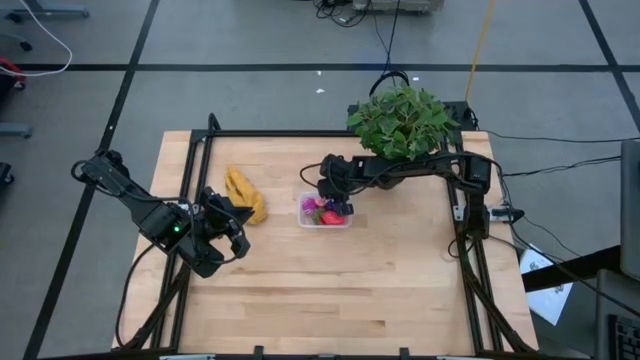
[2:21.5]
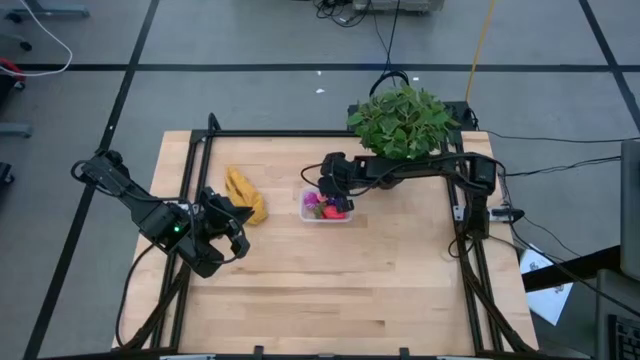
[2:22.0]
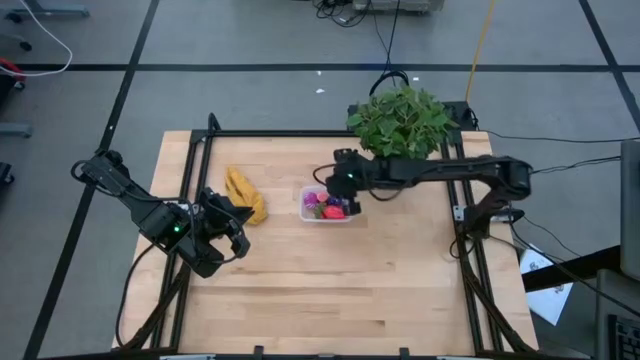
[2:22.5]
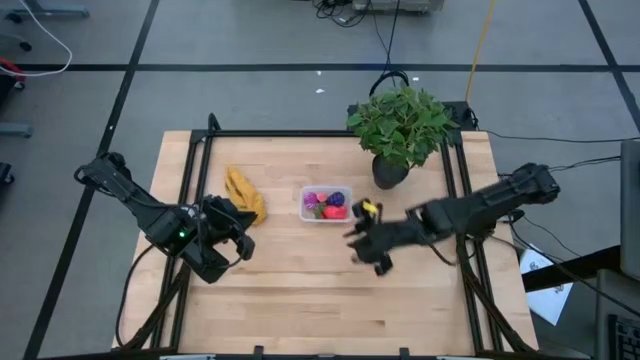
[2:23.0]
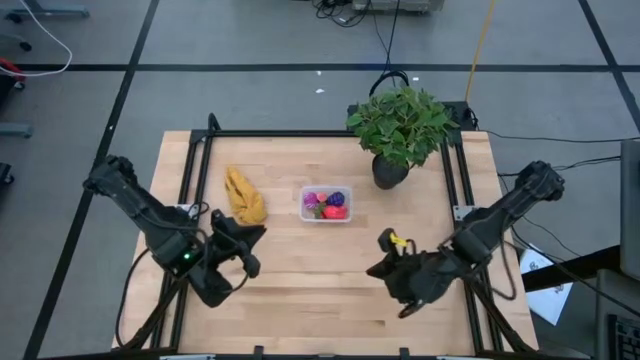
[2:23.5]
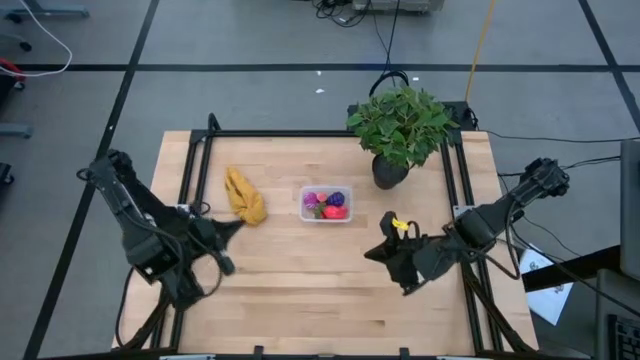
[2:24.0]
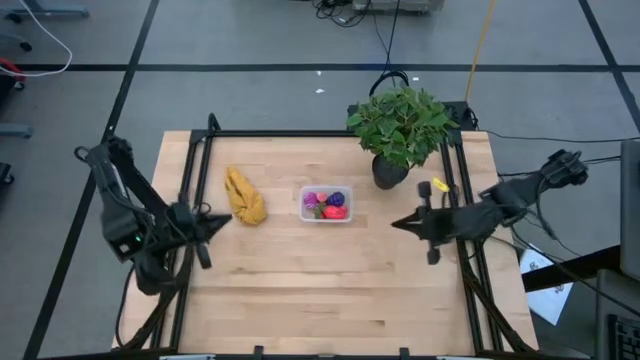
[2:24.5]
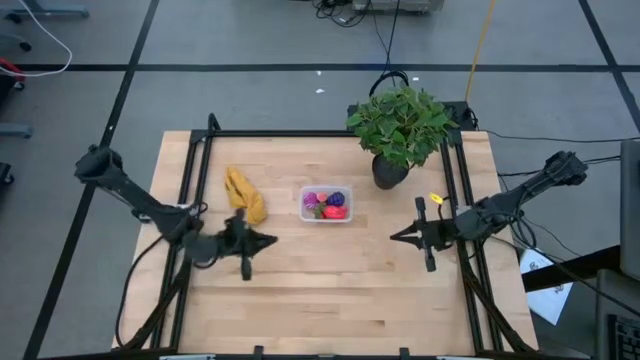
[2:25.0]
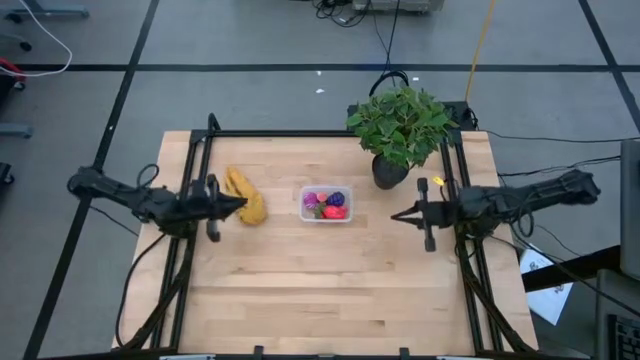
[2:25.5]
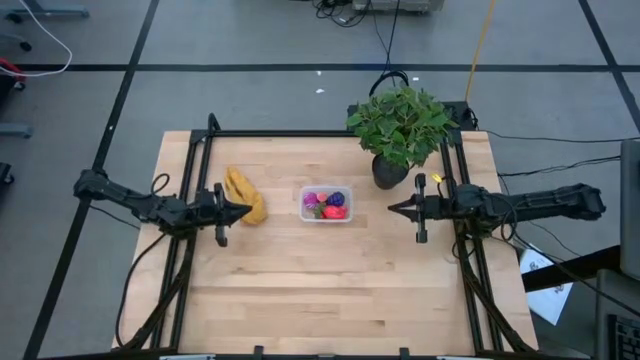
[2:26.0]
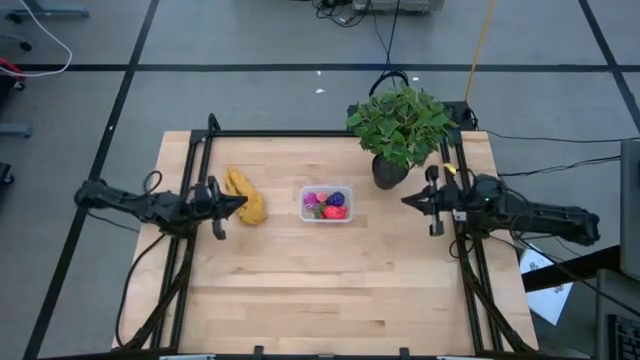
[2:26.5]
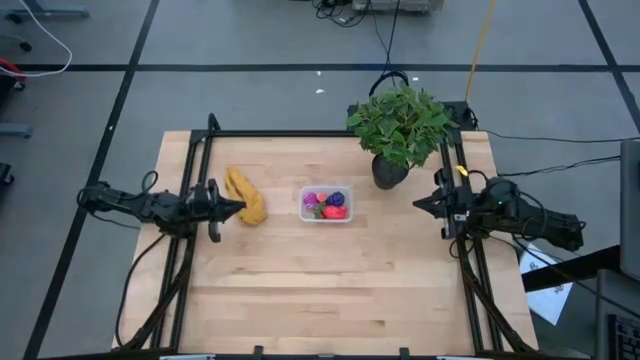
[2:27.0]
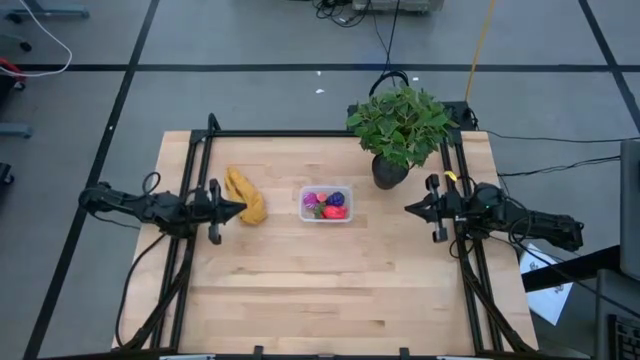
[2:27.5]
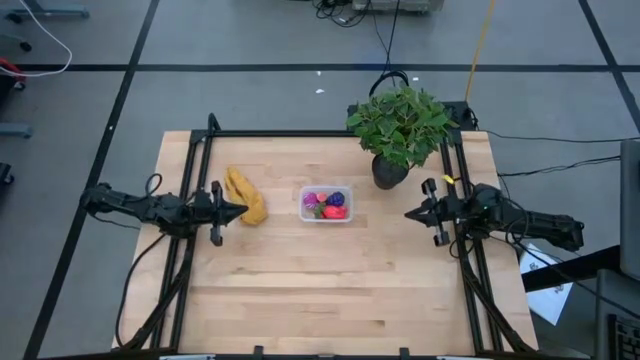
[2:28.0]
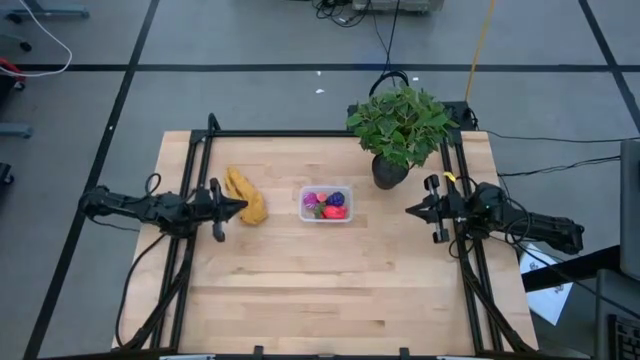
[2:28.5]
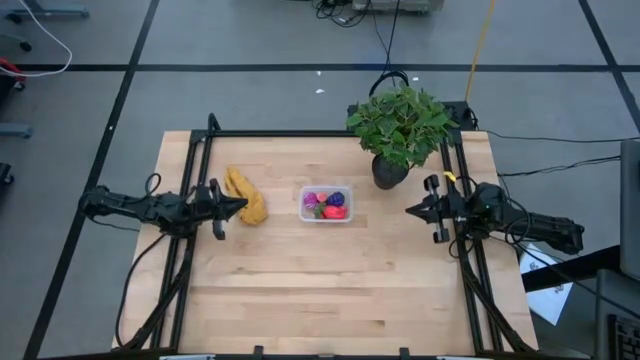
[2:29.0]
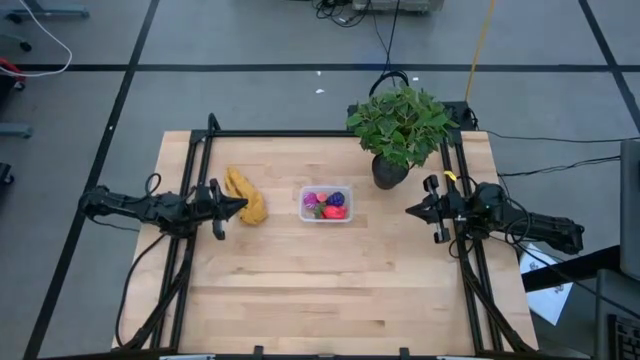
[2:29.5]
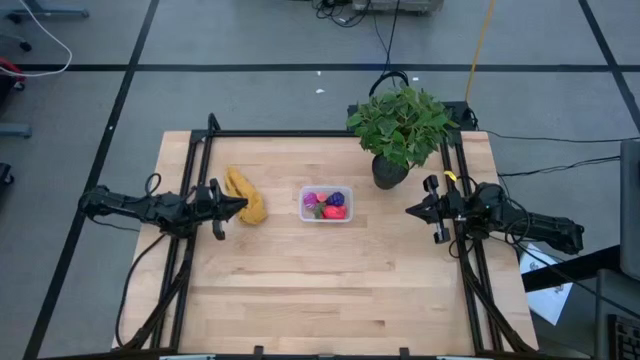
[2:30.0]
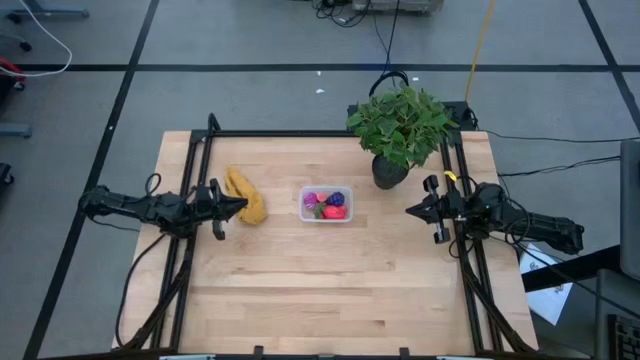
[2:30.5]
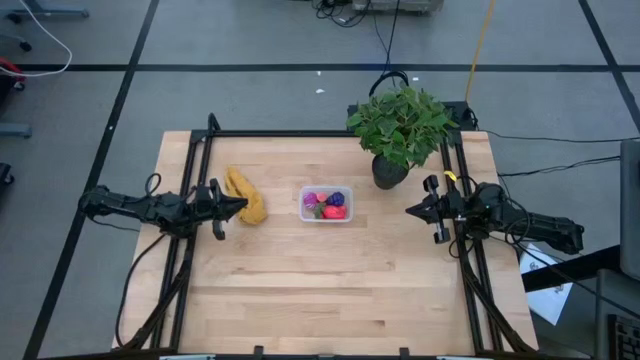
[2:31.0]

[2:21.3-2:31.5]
Task: Pick and placing Produce into tupperware
Return to Home Position

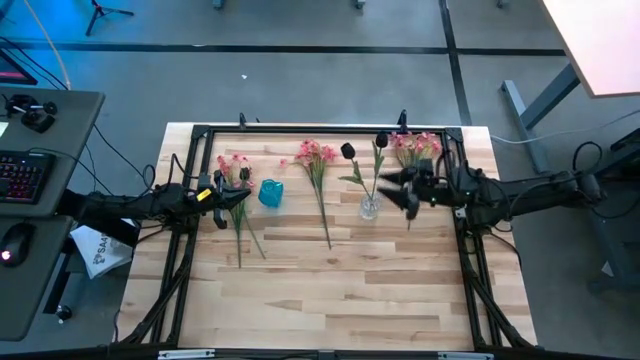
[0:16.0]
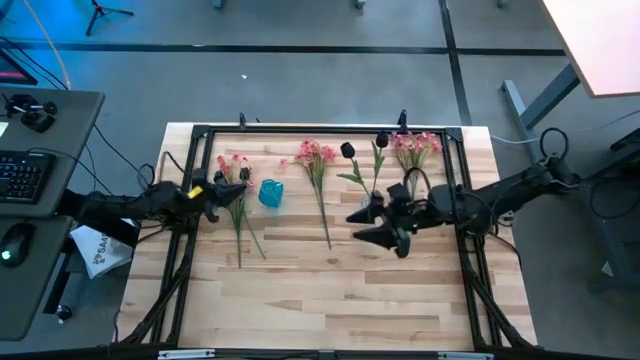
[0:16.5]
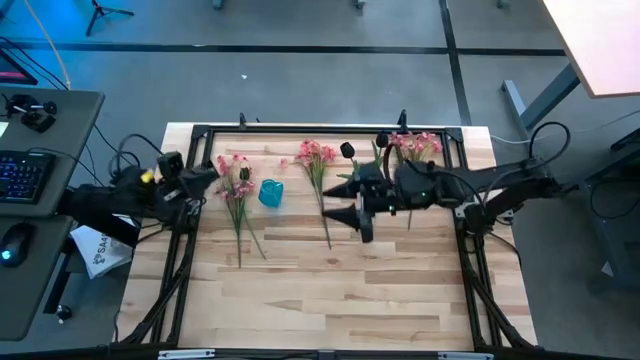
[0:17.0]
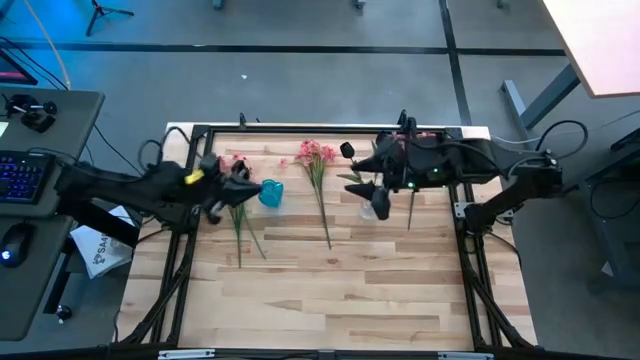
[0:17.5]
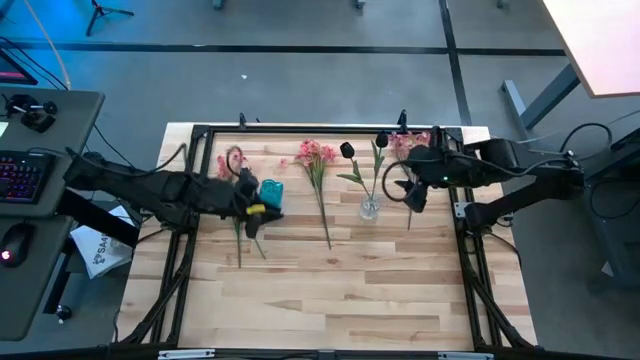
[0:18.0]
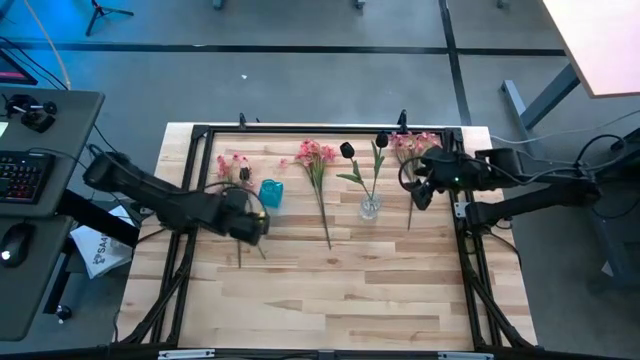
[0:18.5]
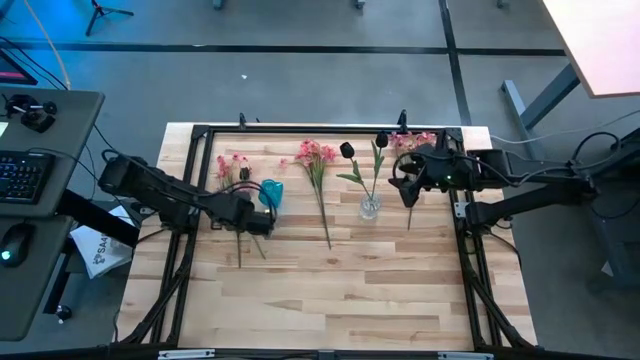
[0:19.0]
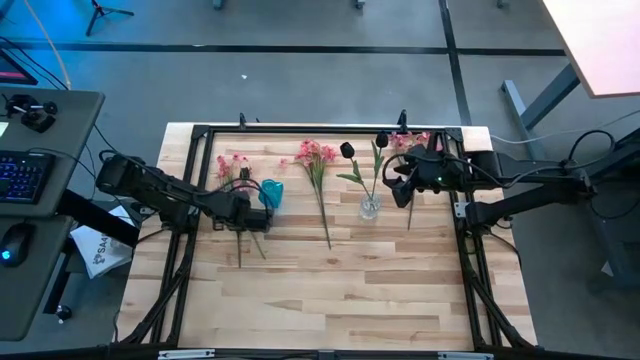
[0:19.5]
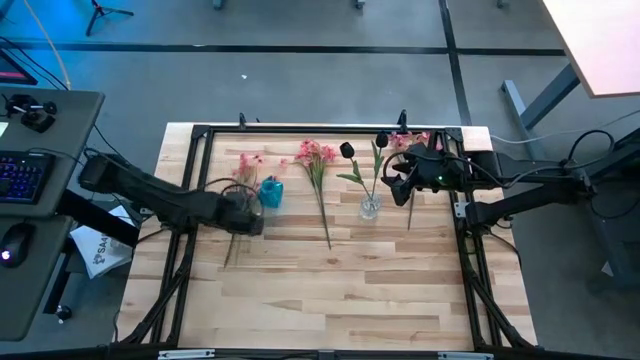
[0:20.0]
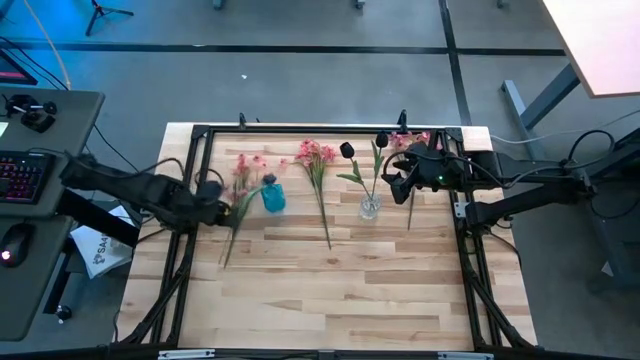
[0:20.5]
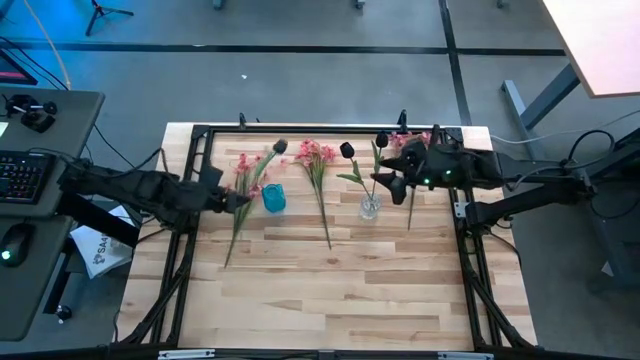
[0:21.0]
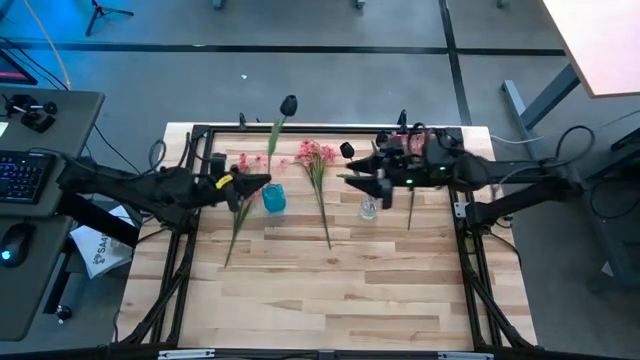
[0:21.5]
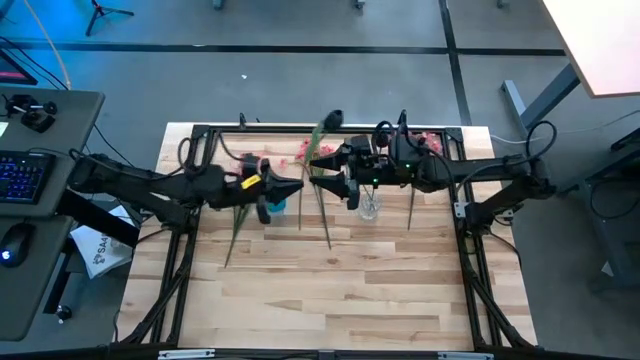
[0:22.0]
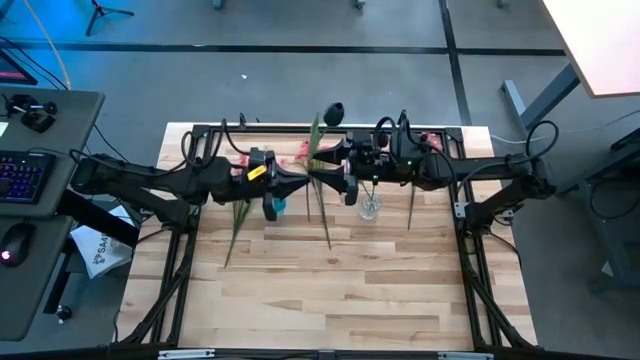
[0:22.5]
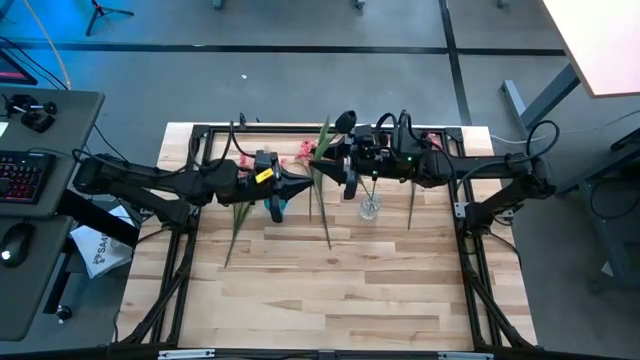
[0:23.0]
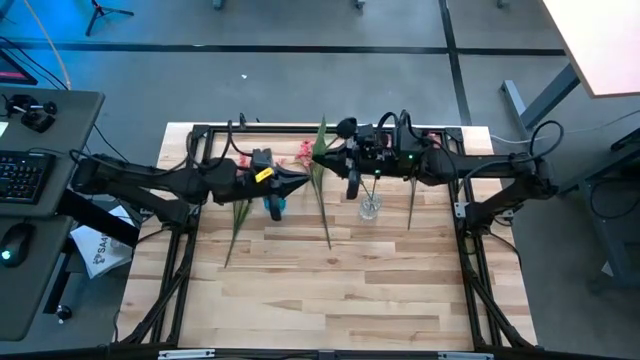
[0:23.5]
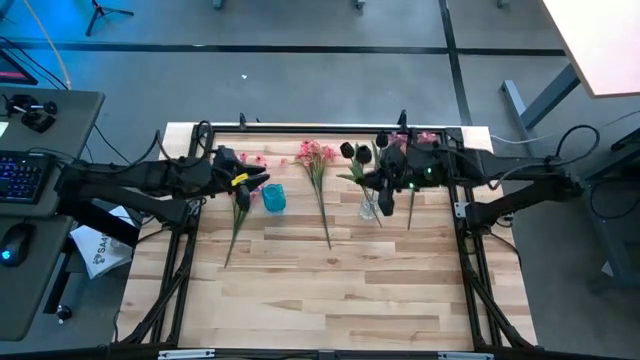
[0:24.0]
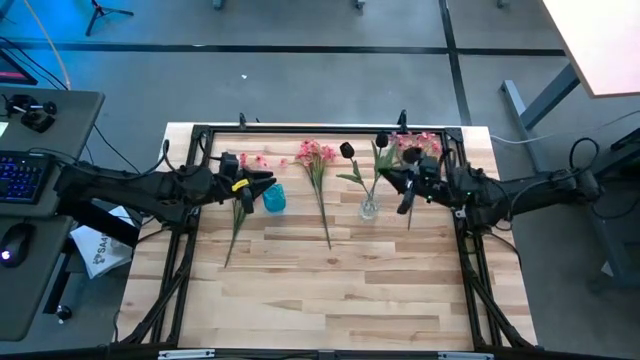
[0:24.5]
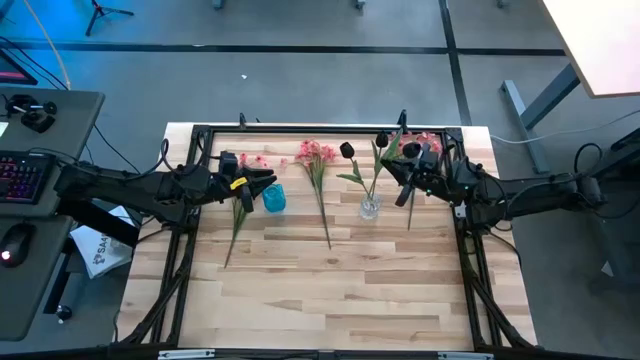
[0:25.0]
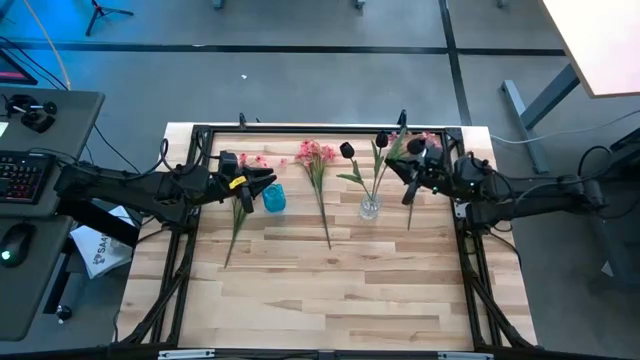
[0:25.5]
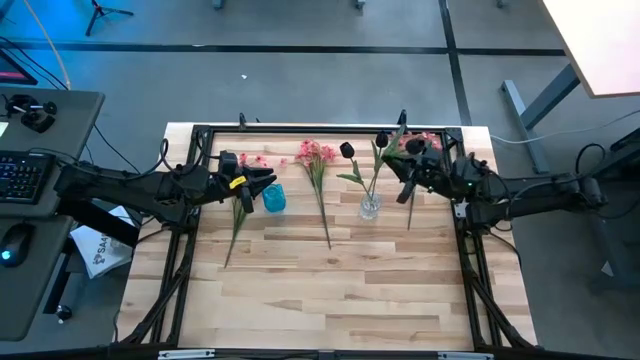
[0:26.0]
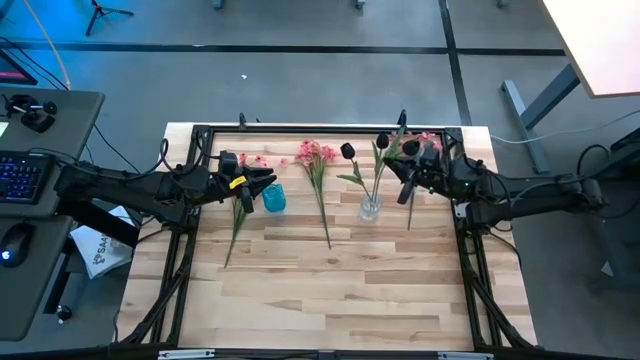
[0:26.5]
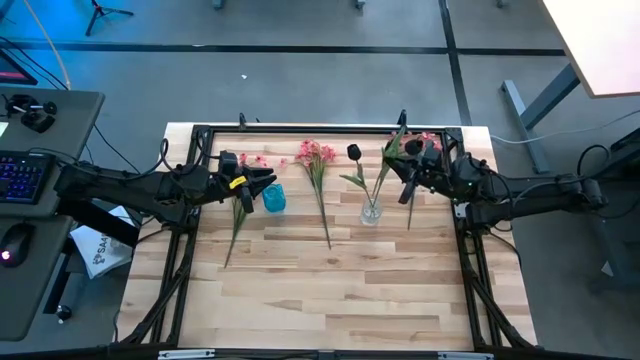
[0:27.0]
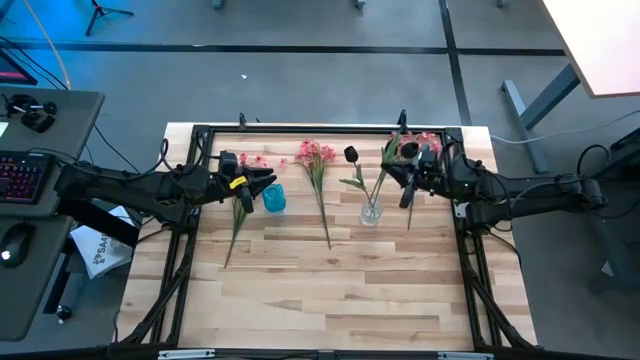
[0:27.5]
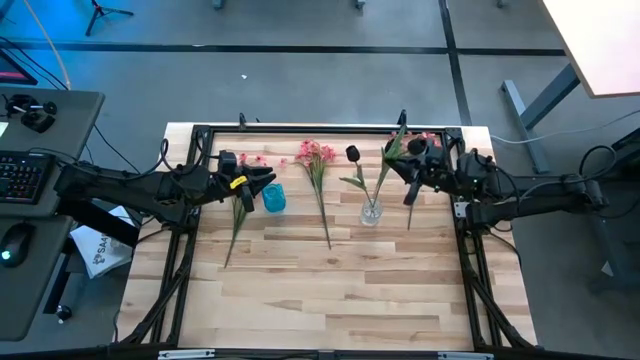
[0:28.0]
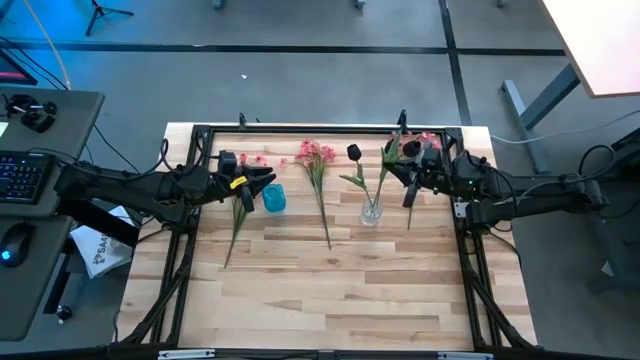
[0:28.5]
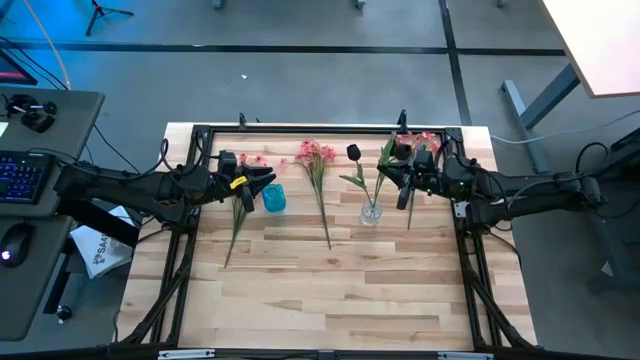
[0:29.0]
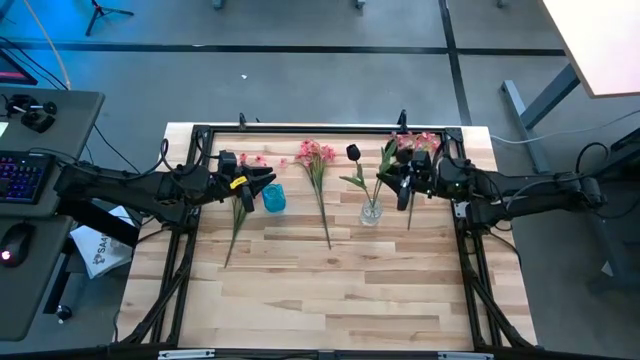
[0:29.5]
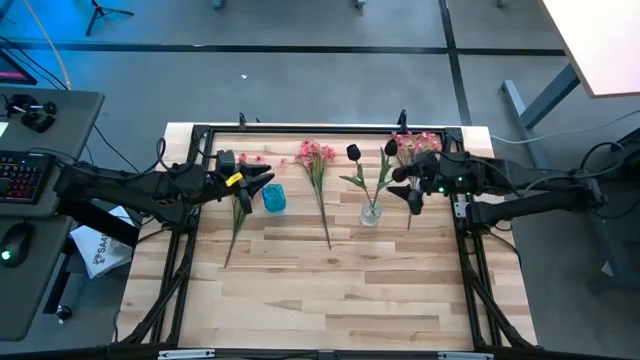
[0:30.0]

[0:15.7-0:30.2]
Task: Sort flowers into vase by color
Put the black tulip flower into the transparent flower vase
